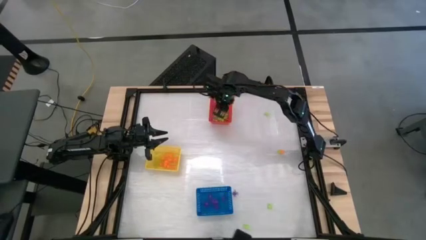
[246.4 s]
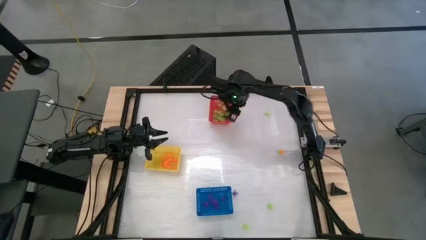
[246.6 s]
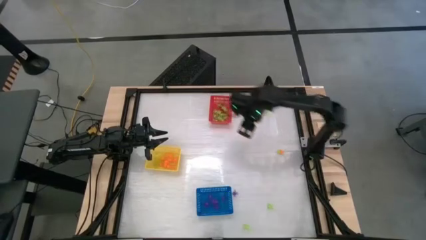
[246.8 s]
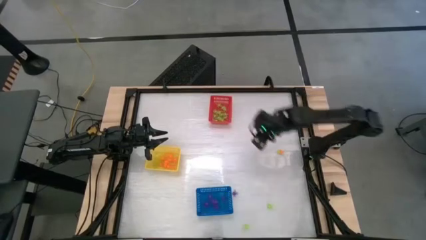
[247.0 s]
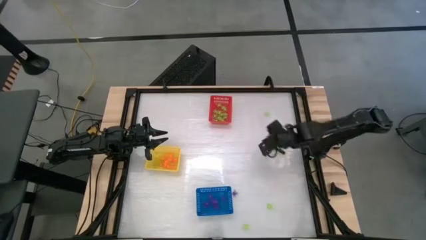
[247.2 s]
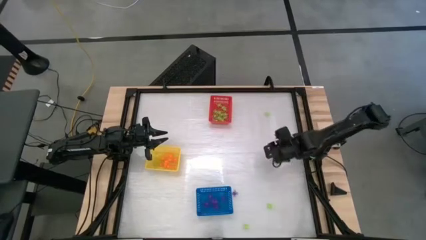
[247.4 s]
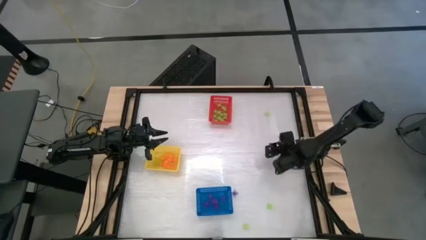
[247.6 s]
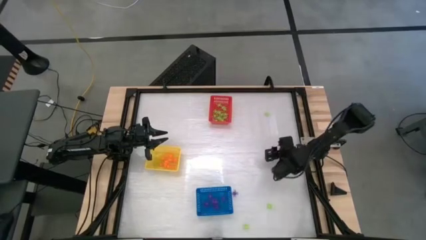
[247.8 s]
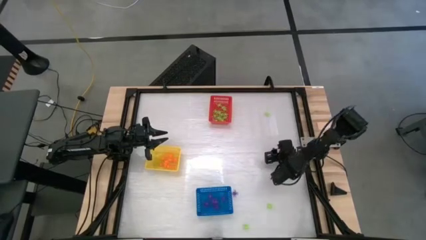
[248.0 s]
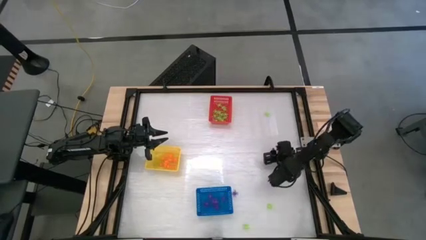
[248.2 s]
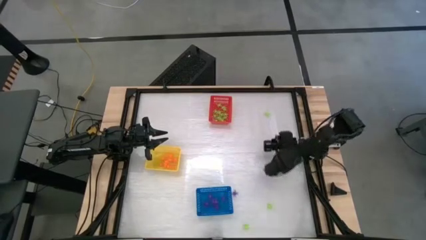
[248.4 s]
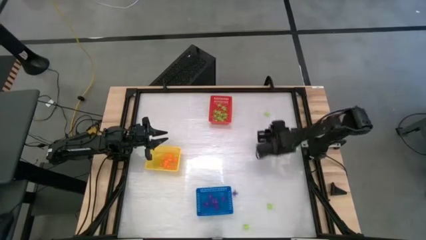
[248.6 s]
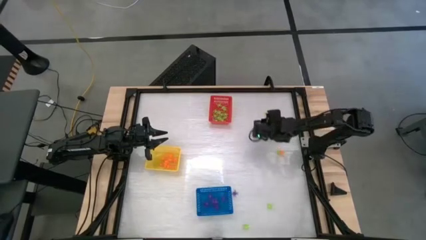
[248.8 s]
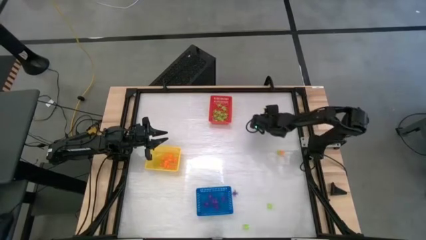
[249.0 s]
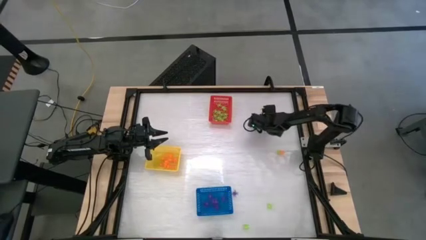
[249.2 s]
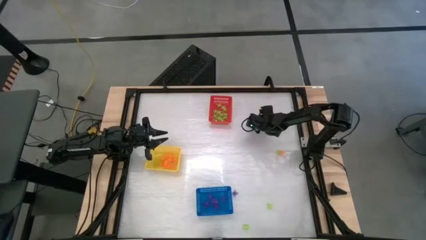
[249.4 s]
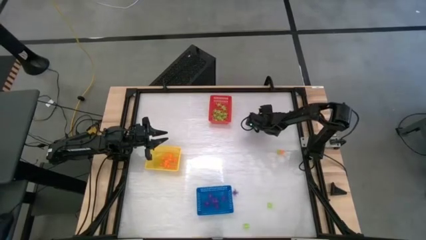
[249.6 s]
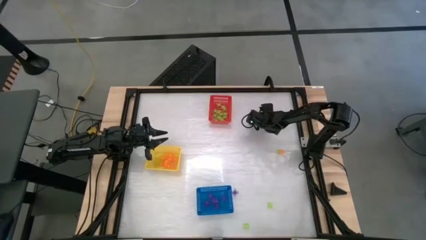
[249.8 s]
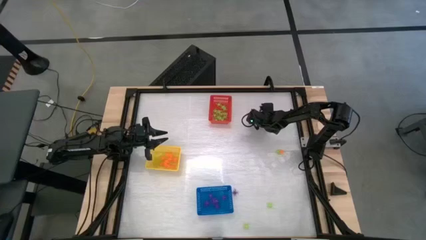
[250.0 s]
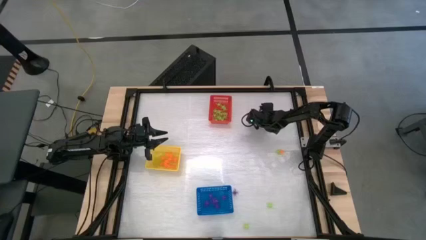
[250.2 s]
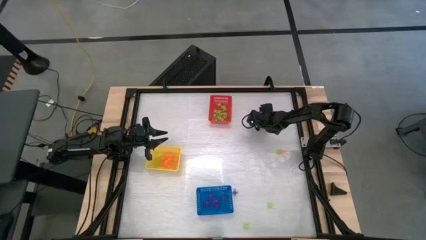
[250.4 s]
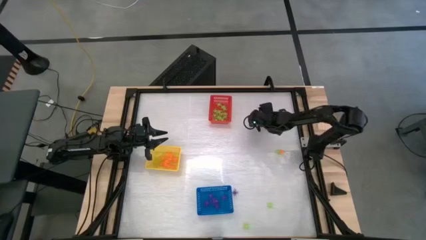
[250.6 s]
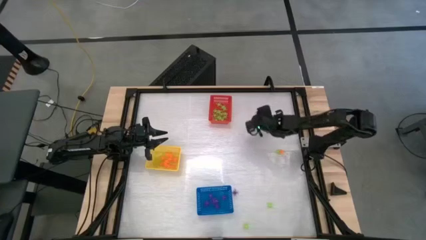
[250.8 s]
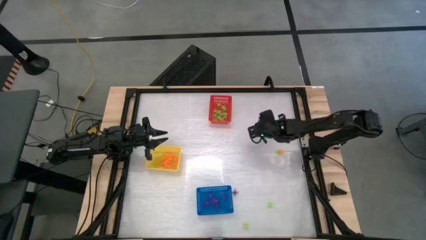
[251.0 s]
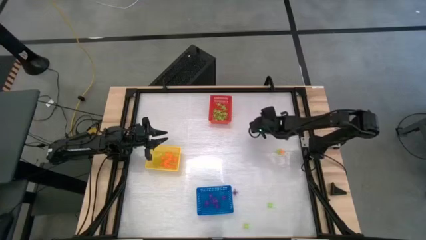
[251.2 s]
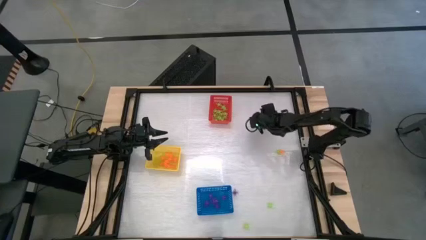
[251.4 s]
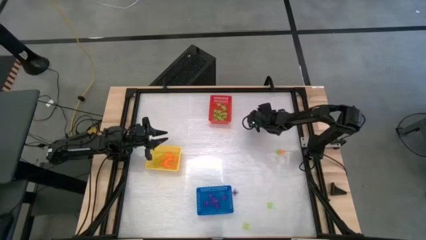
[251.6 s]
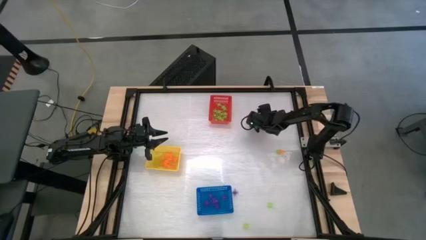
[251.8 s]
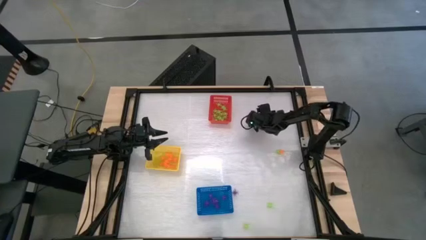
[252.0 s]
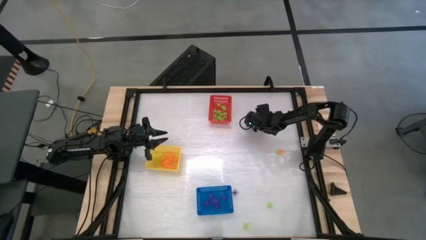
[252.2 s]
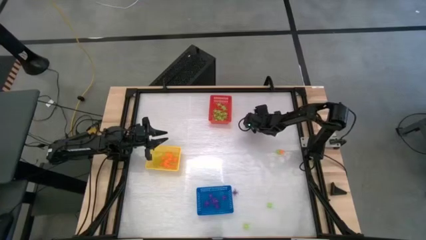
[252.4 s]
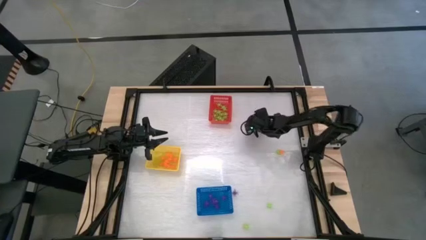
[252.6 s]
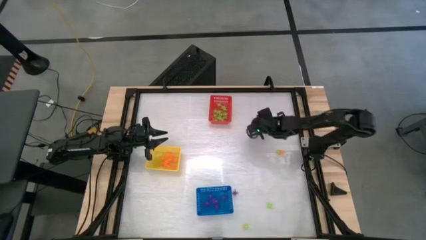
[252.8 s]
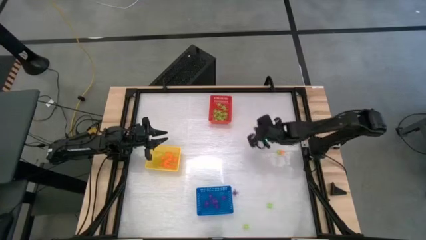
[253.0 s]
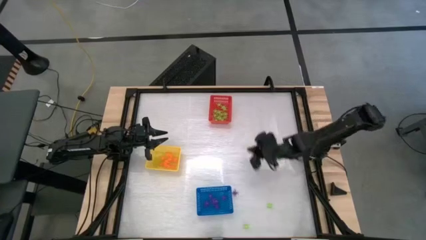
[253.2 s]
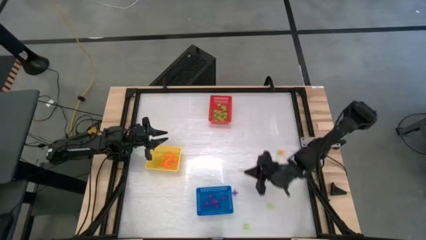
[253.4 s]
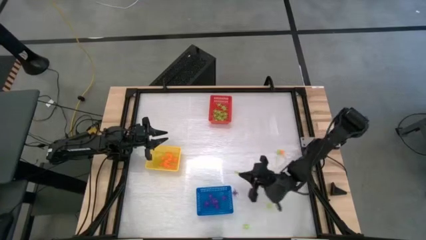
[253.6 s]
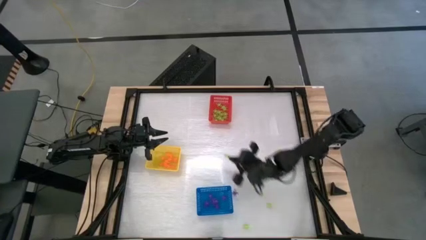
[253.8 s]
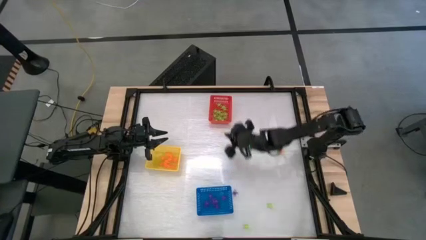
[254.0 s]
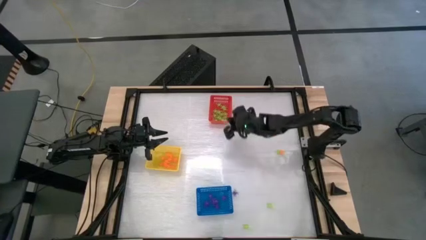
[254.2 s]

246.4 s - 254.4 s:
Task: Sort Halloween decoration
Put the green spider toy into the red basket

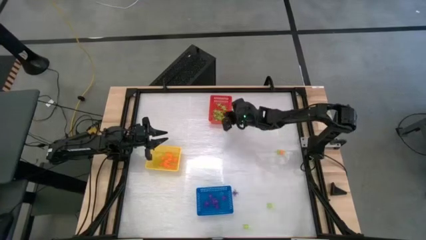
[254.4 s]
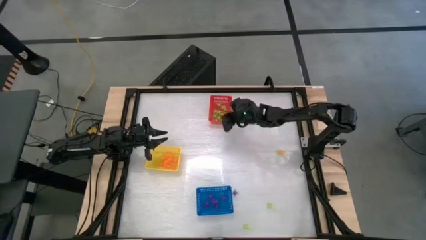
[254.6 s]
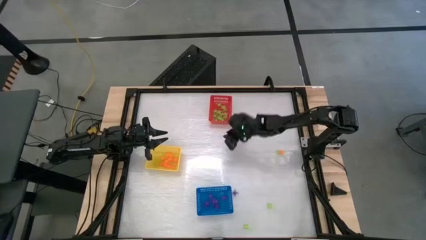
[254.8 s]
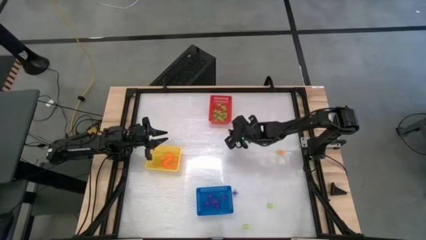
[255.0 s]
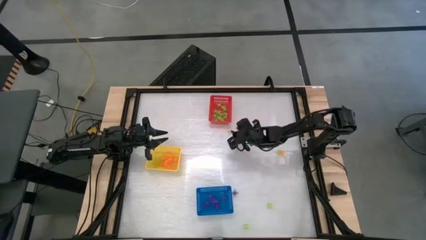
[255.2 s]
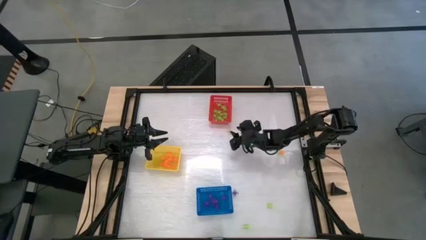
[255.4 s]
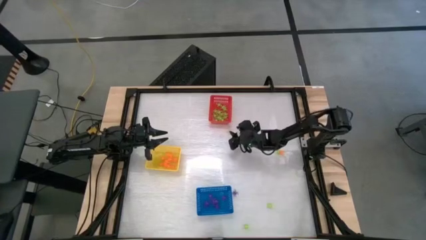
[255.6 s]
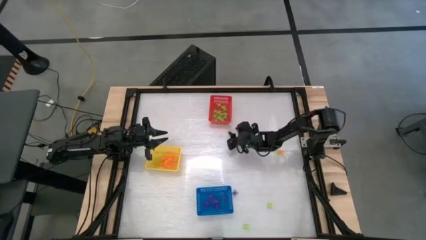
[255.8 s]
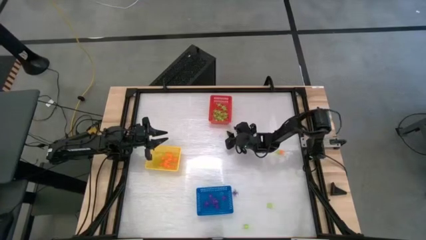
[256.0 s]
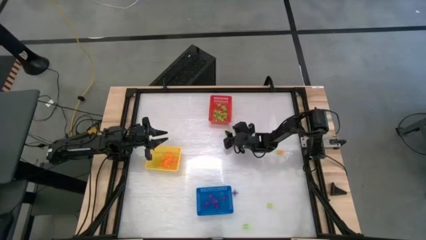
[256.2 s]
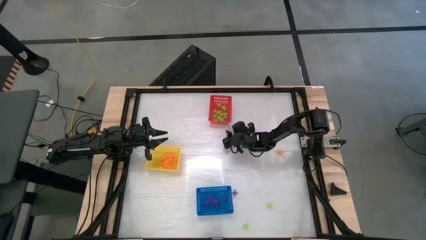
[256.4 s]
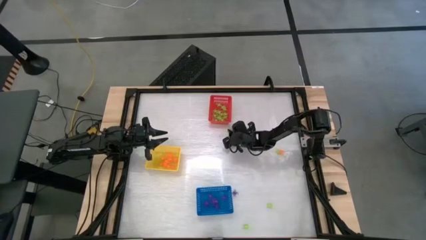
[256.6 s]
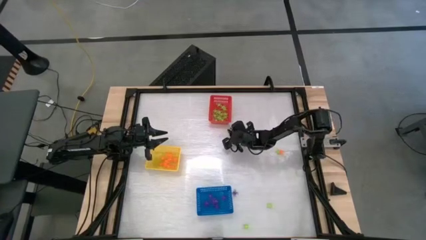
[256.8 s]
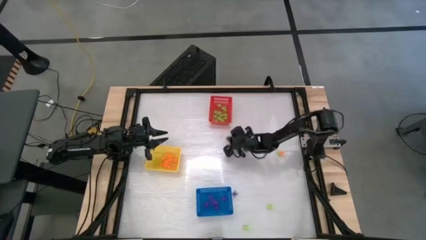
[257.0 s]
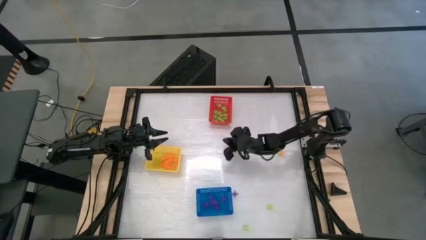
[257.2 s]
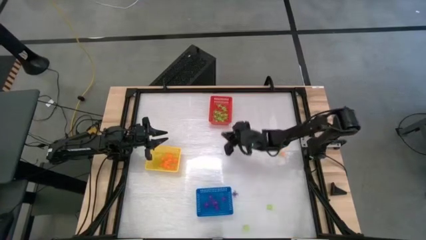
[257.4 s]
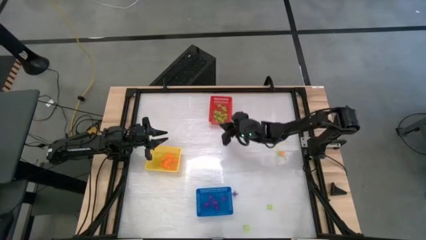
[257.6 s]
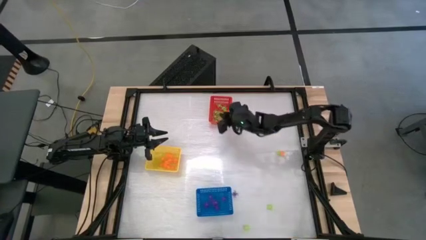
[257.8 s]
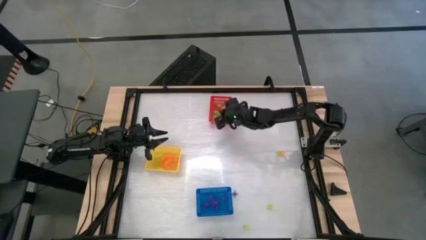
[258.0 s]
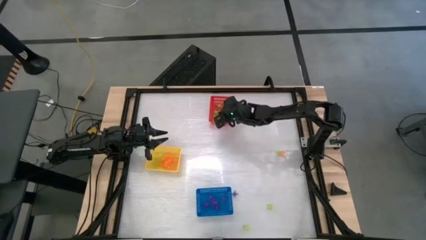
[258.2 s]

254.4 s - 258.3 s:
Put the green spider toy into the red basket

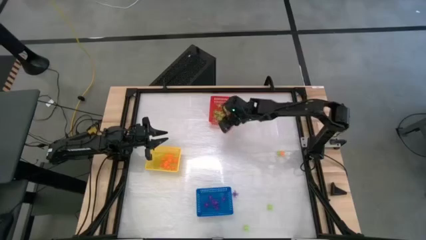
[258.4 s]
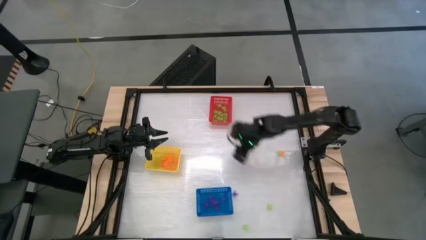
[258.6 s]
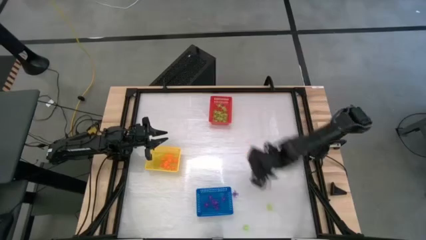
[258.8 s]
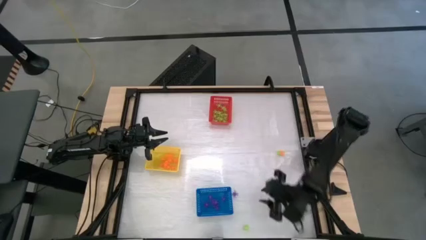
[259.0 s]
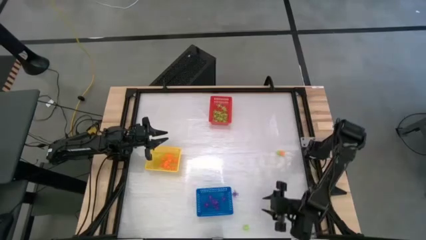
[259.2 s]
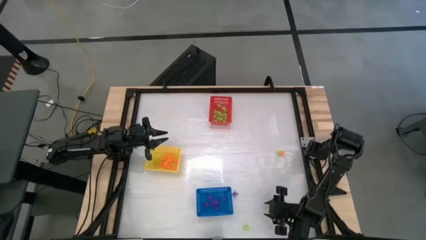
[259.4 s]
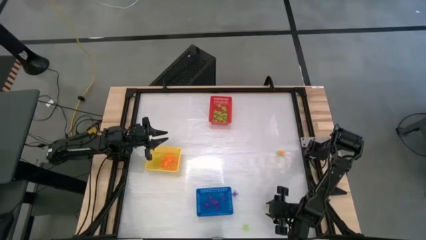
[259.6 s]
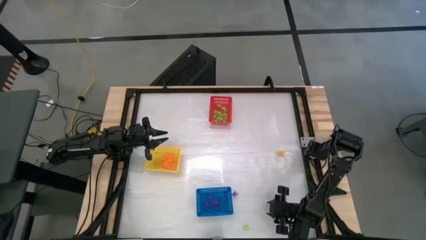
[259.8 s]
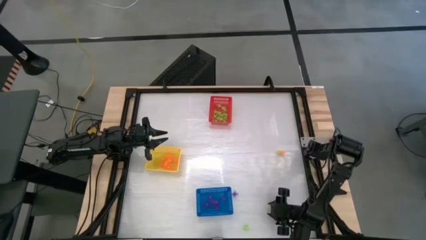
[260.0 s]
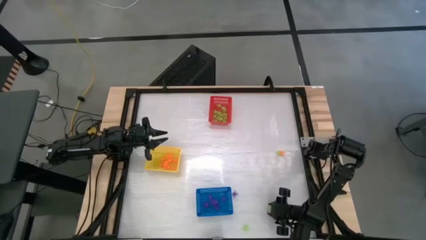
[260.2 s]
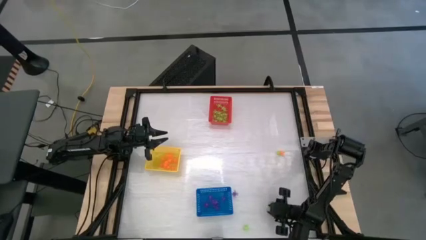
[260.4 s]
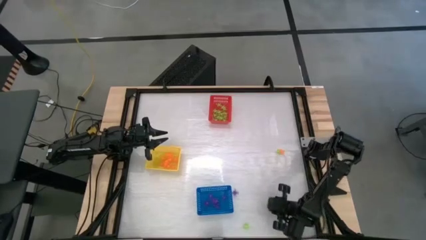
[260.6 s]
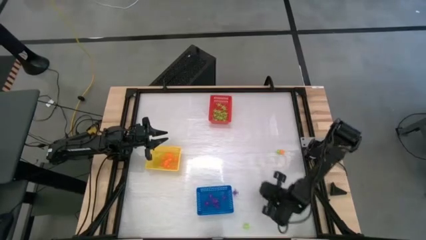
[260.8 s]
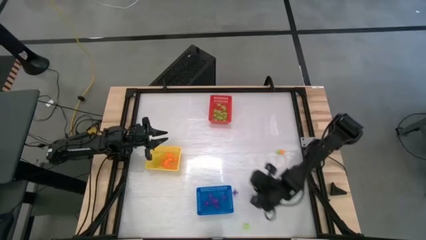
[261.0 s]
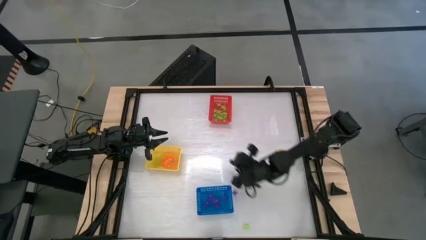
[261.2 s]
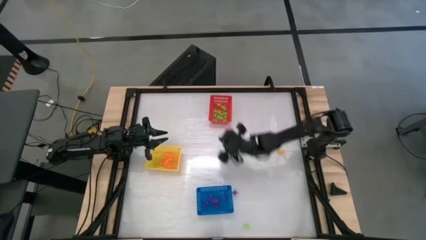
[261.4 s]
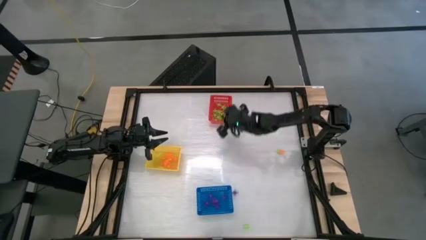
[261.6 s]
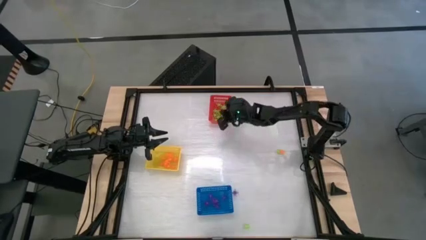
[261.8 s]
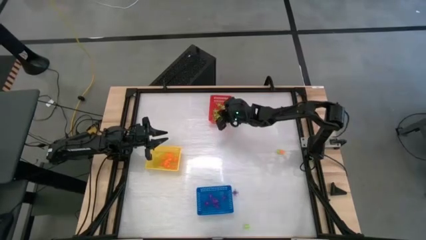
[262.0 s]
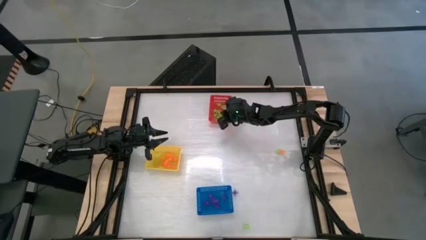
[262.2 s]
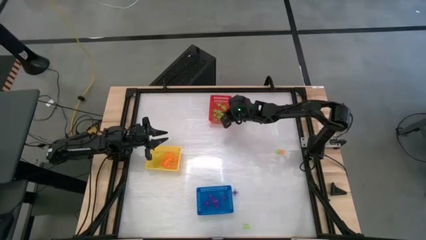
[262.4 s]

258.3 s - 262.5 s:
Put the green spider toy into the red basket

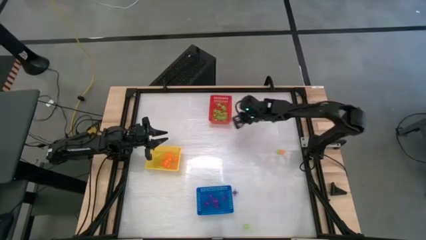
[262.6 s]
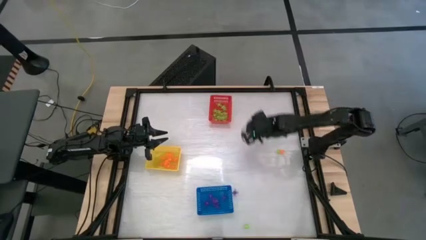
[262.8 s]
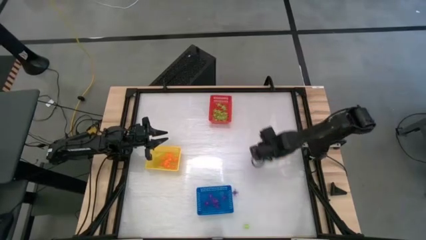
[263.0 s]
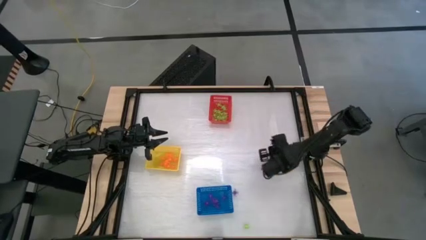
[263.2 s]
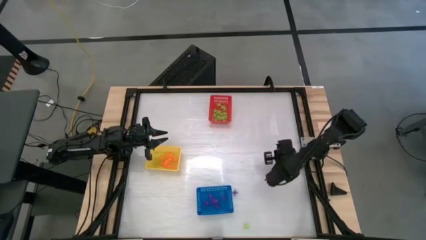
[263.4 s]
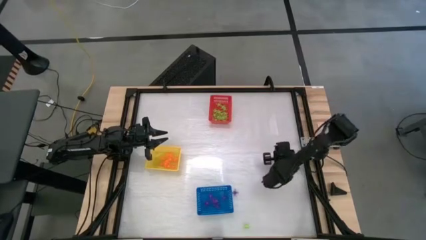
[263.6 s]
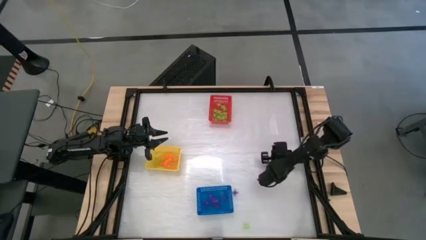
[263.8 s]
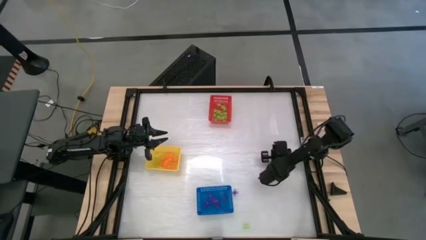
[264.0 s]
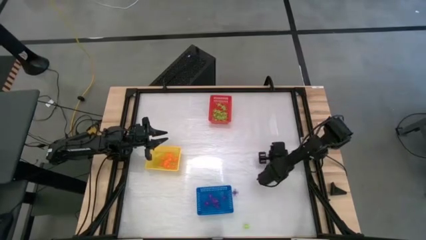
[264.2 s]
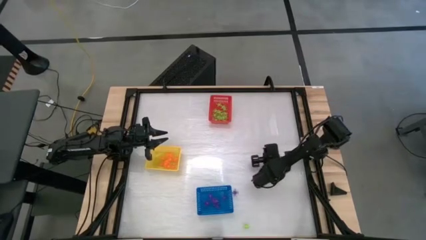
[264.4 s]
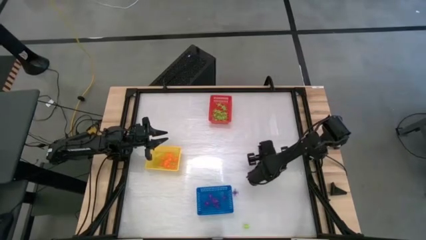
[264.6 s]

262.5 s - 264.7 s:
Put the orange spider toy into the yellow basket
